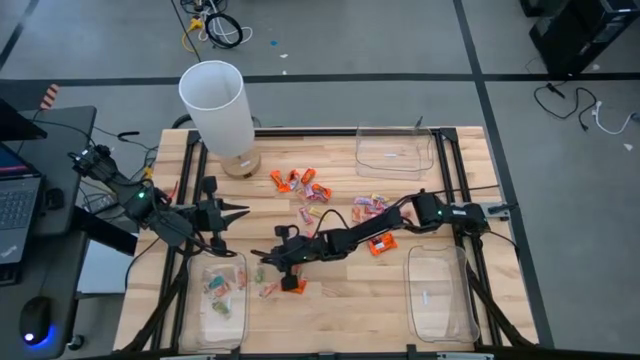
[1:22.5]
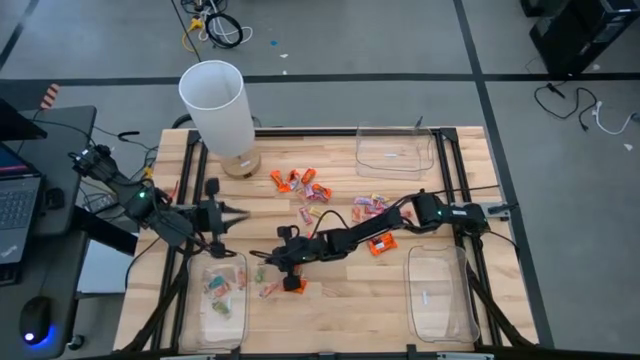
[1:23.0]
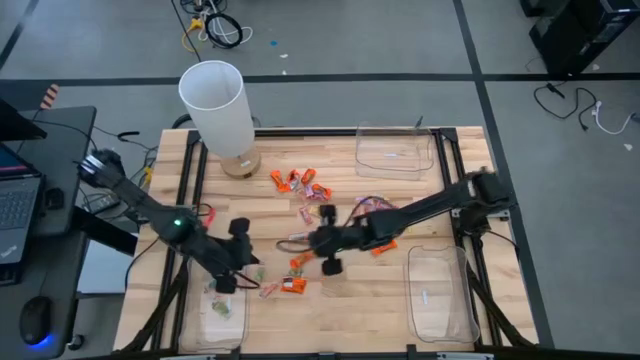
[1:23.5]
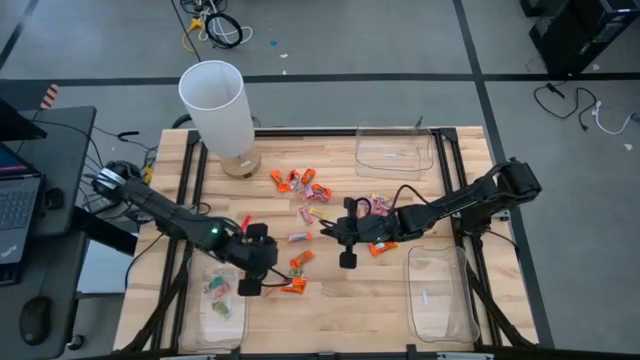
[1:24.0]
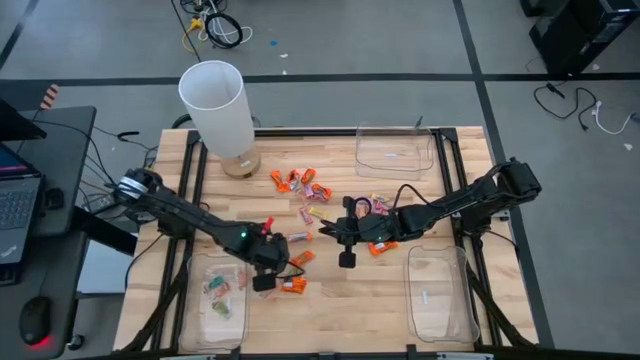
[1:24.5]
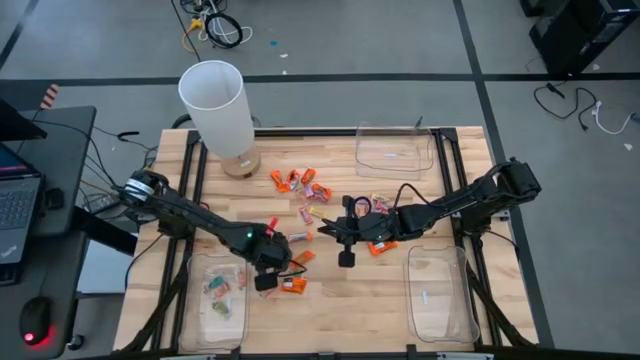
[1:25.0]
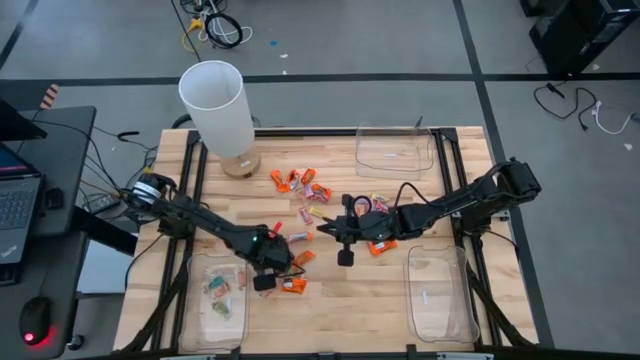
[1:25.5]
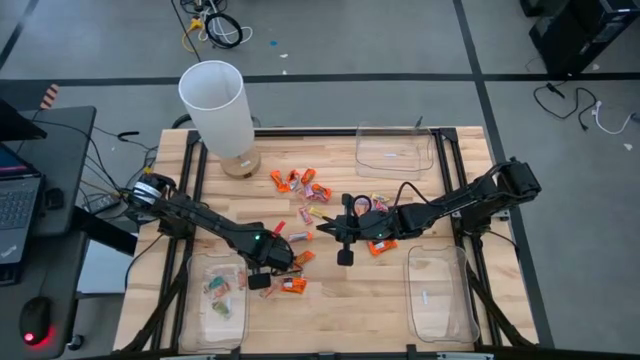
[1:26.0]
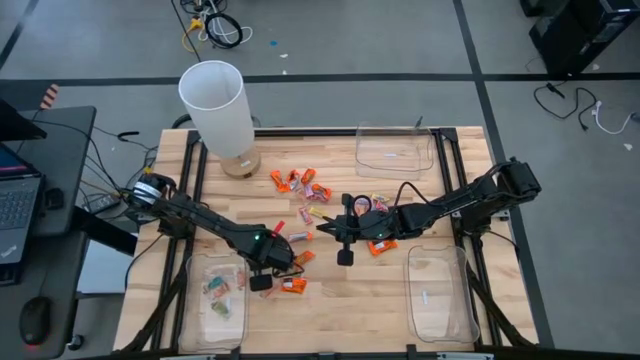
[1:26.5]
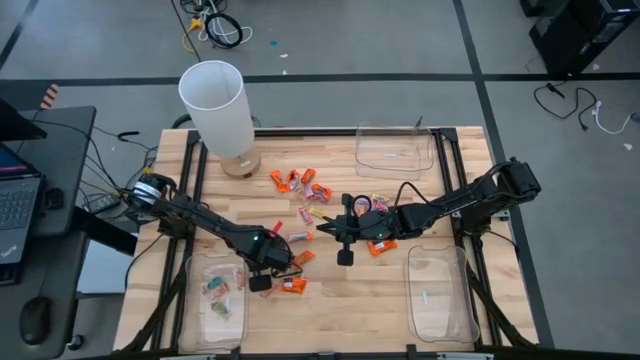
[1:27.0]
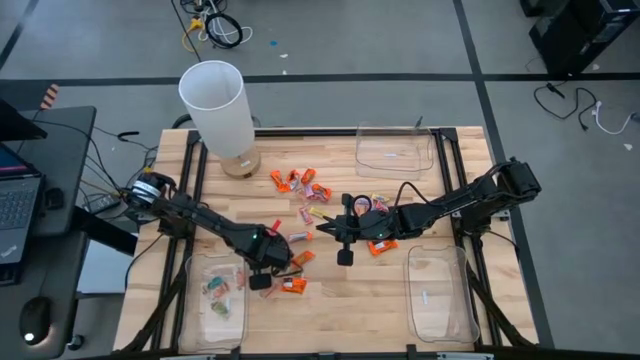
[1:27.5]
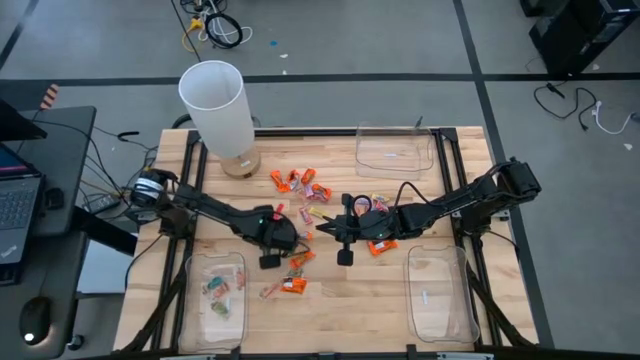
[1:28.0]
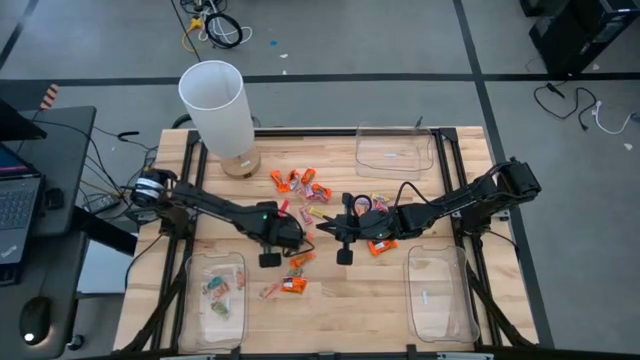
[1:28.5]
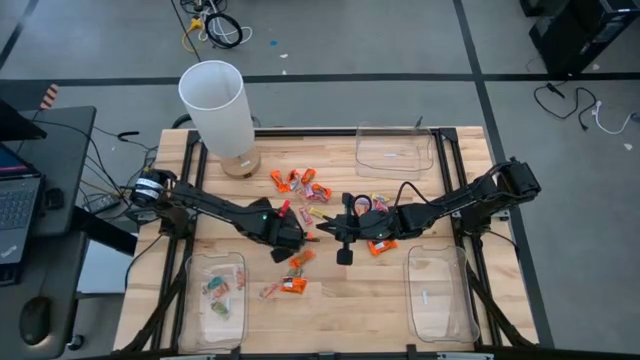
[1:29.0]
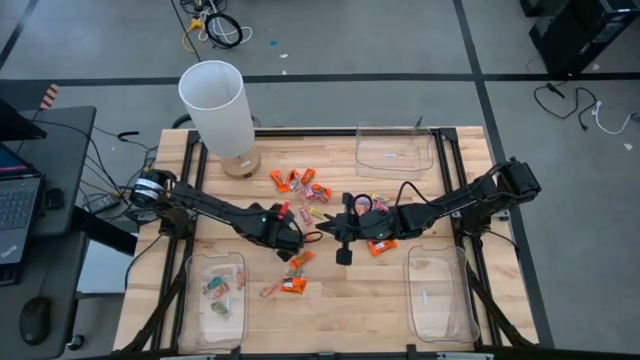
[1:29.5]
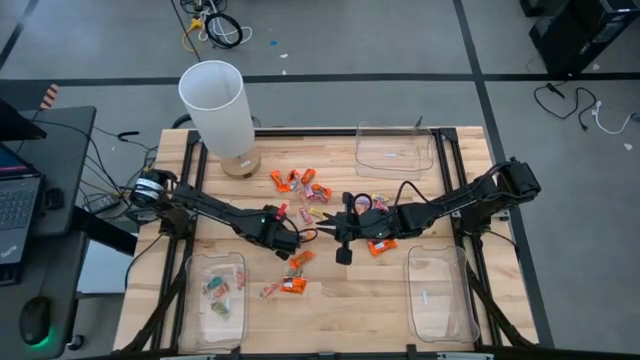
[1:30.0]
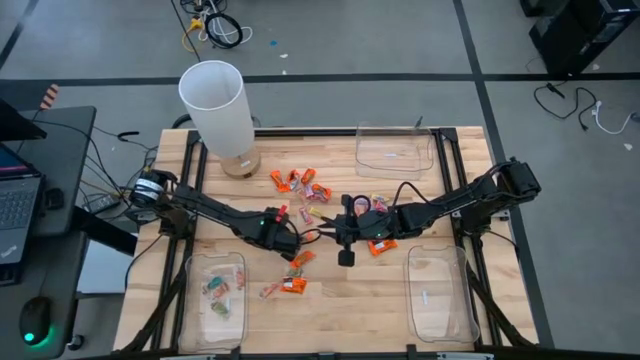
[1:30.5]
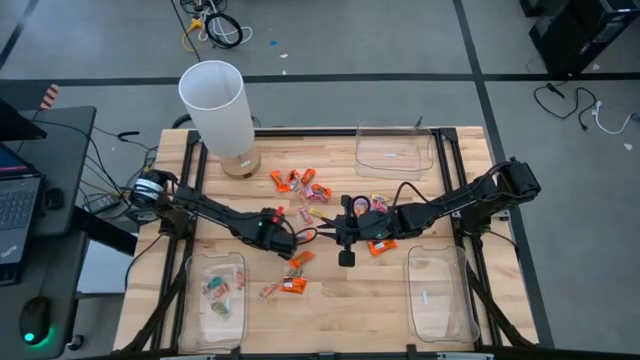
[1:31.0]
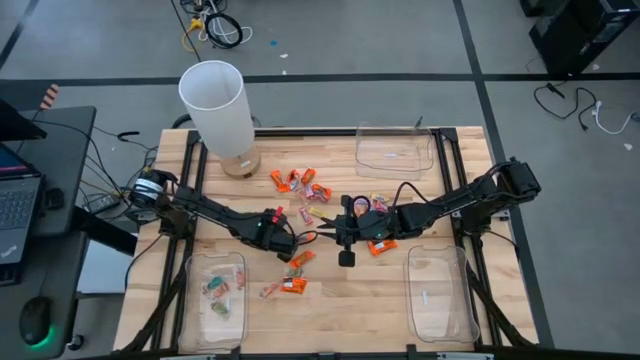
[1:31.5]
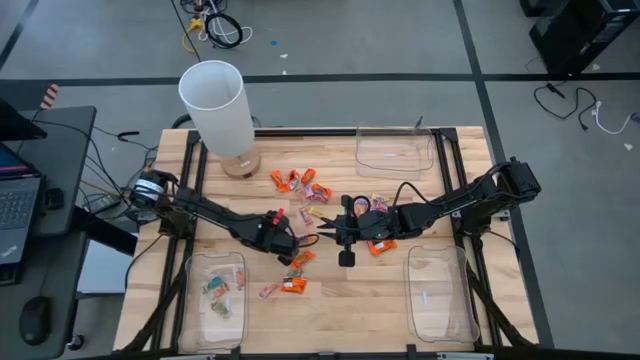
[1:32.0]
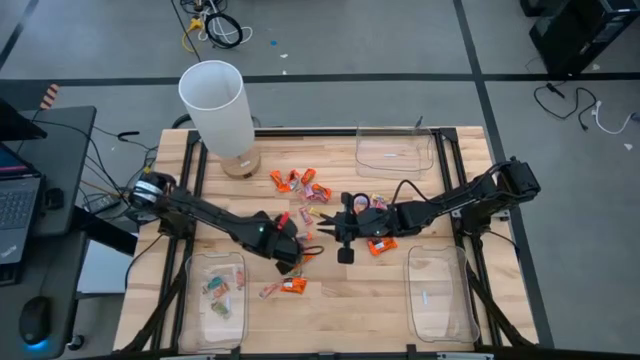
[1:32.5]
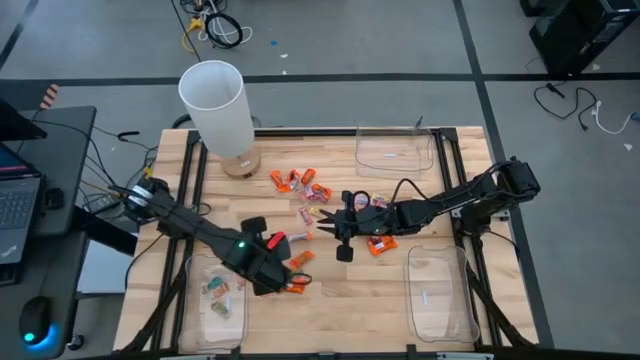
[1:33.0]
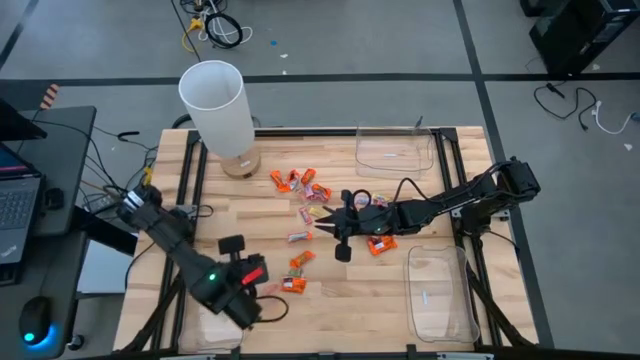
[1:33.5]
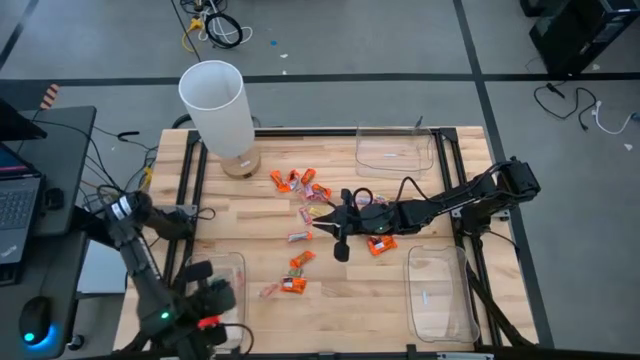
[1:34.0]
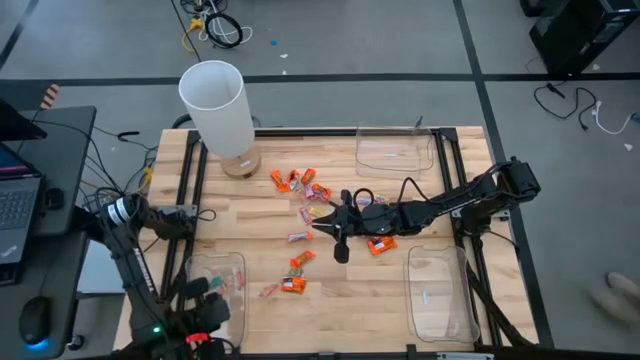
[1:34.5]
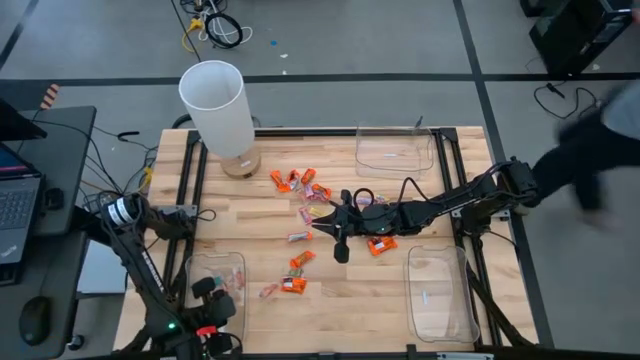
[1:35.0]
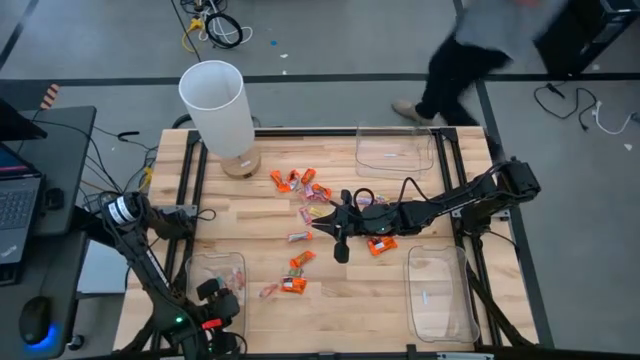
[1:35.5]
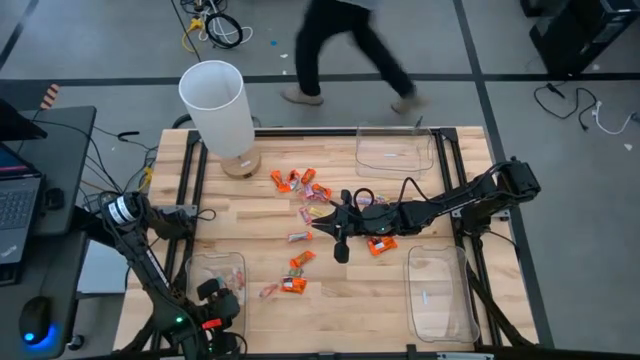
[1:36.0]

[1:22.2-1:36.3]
Task: Sort candy
Put the green gummy into the bottom left transparent bin

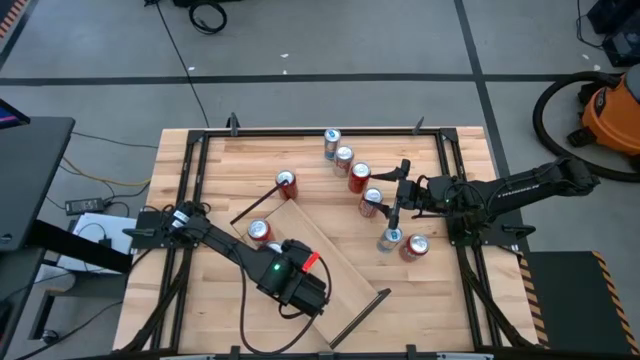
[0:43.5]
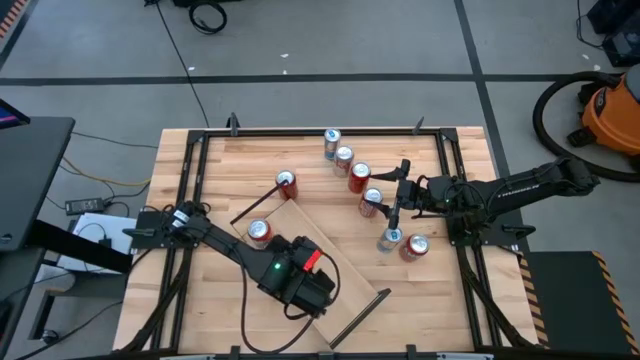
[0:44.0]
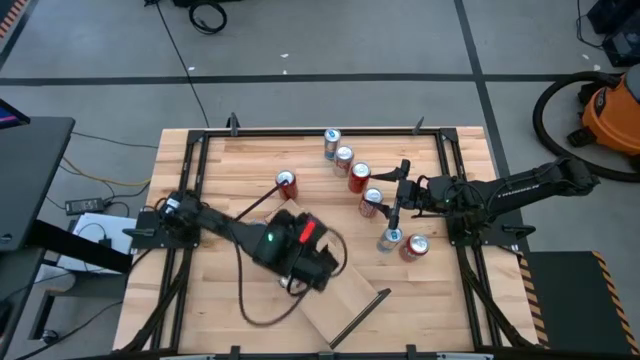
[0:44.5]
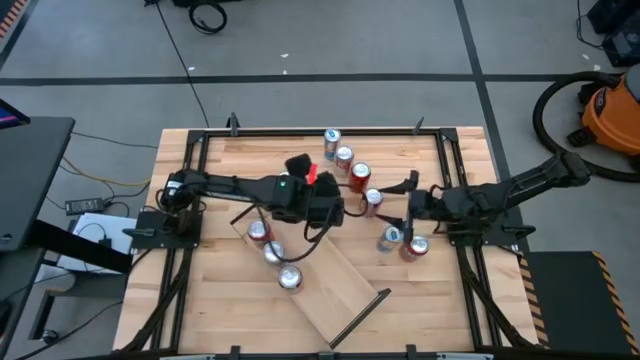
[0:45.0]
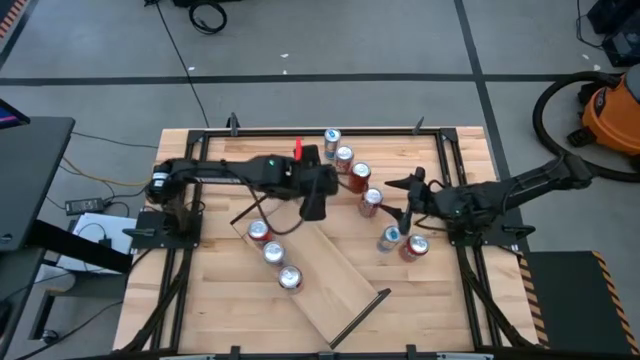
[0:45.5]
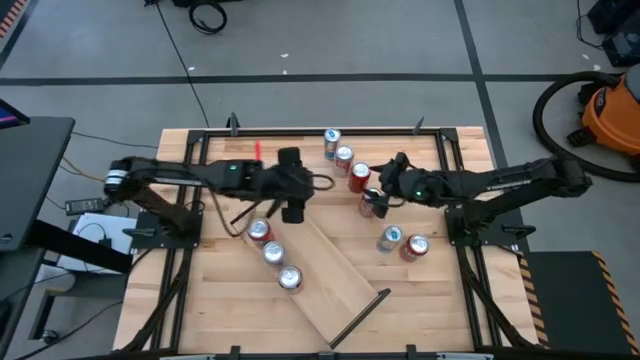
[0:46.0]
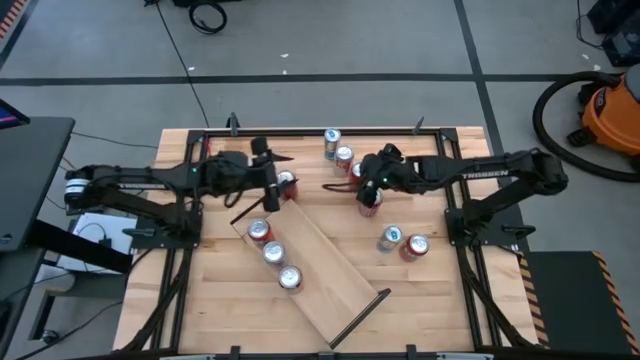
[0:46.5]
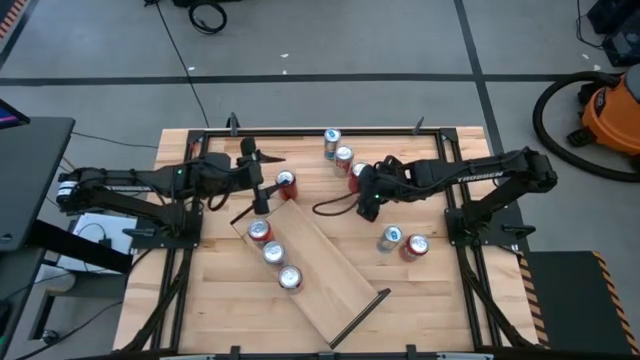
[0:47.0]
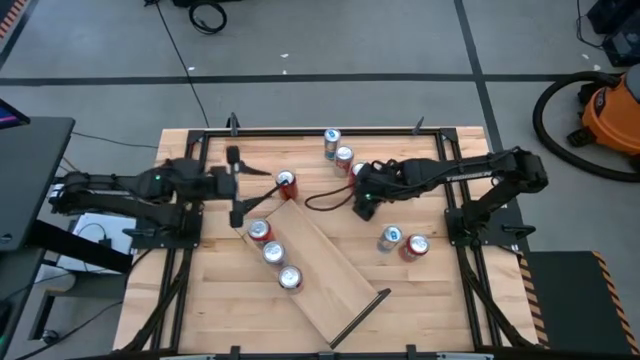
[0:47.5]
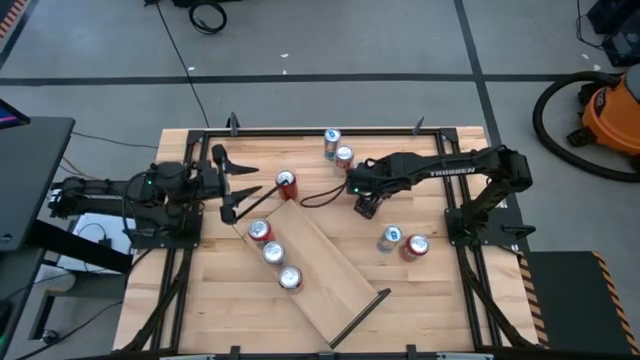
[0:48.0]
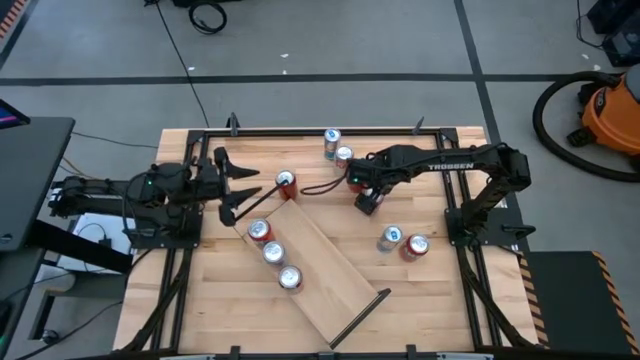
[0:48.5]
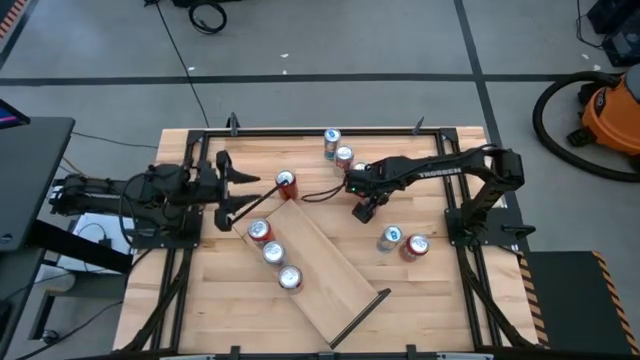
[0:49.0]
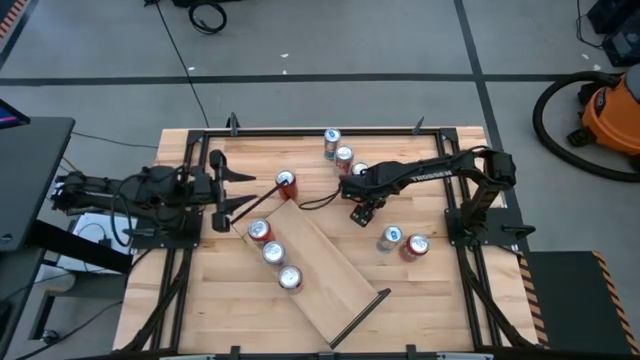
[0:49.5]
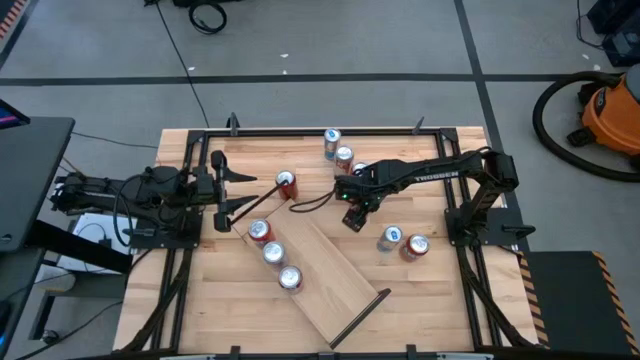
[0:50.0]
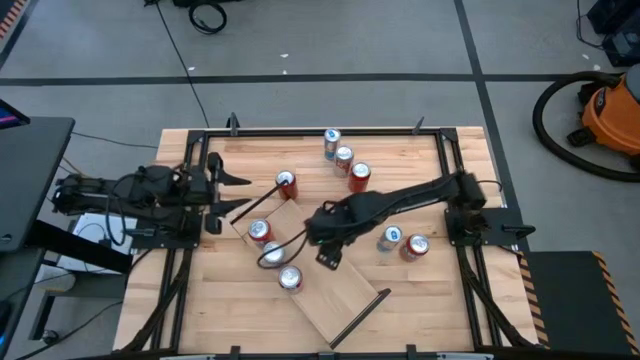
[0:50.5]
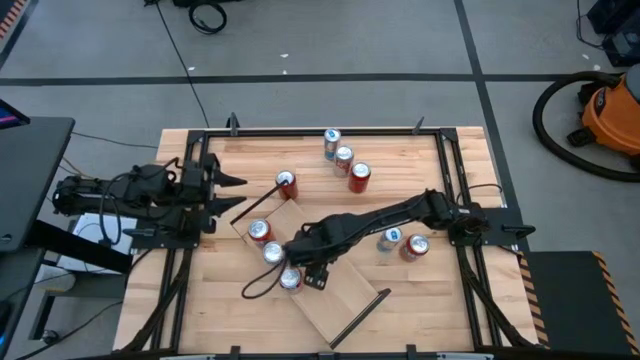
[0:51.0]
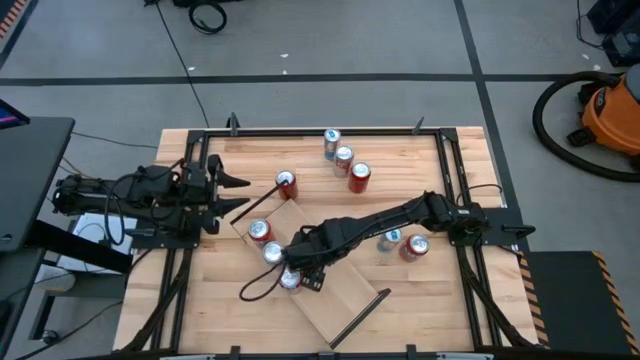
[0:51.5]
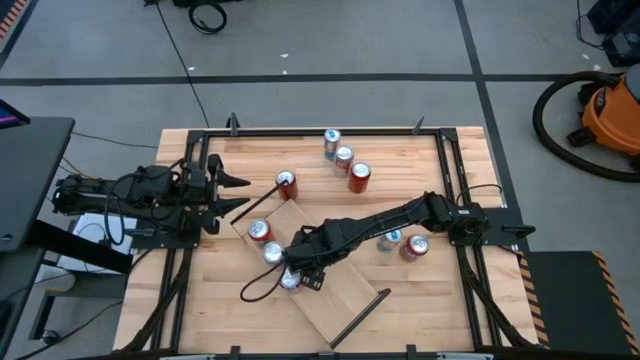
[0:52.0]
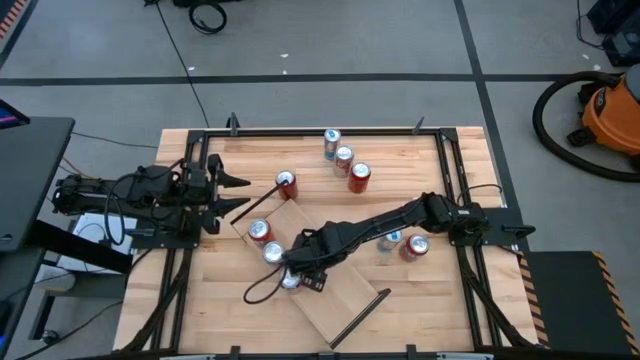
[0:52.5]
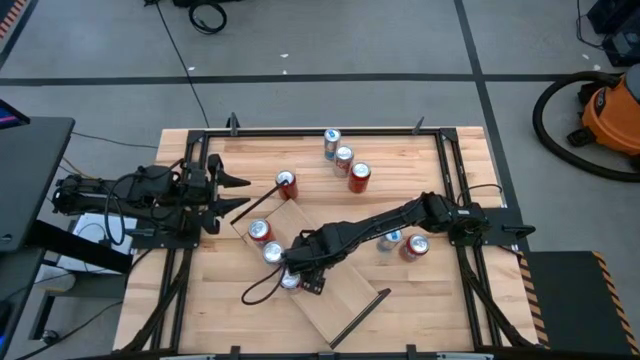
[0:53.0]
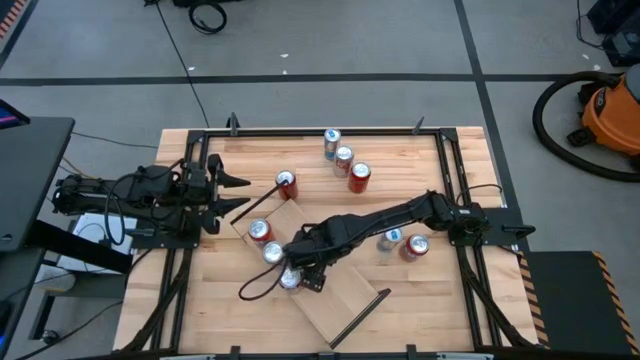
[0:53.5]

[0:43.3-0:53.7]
Task: Place canned beverage on shelf
Put the red soda can on the shelf aligned with the other red soda can
